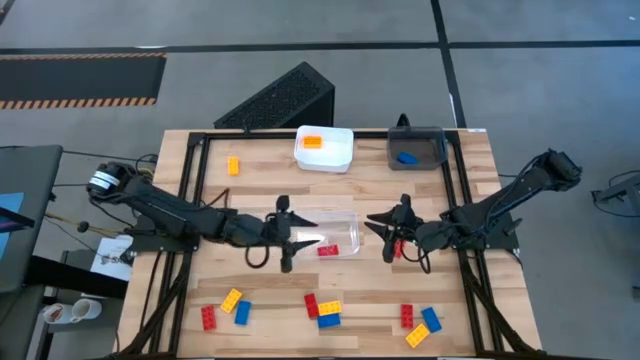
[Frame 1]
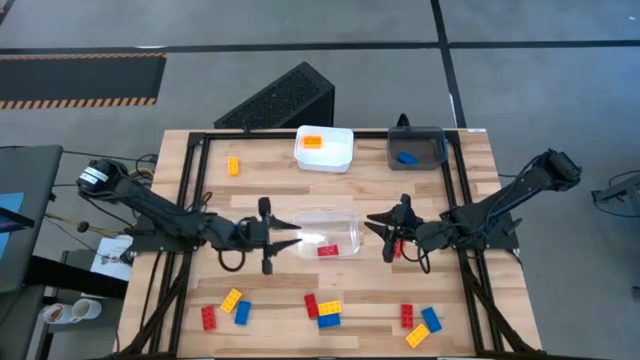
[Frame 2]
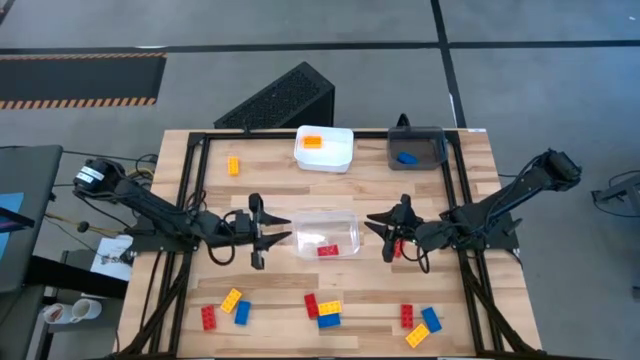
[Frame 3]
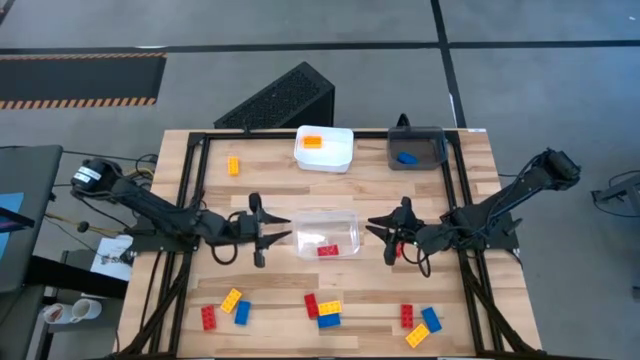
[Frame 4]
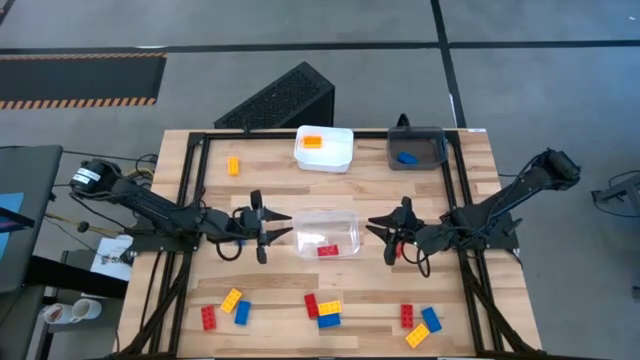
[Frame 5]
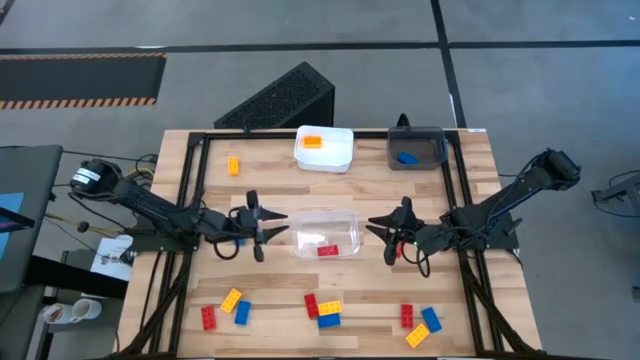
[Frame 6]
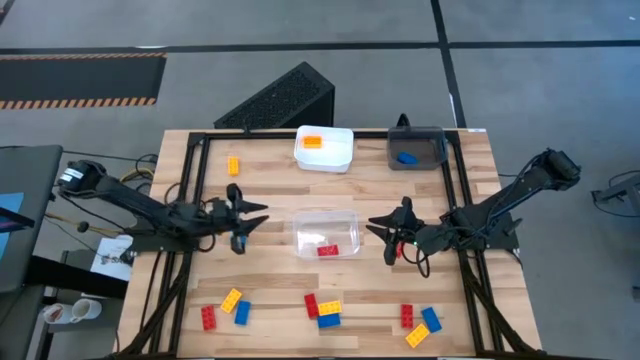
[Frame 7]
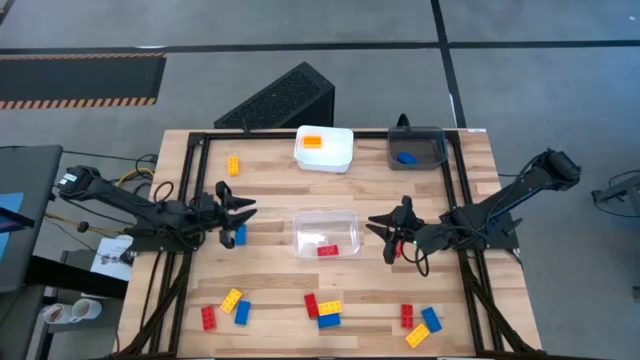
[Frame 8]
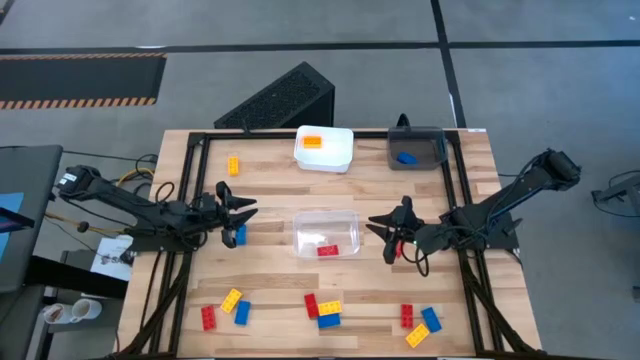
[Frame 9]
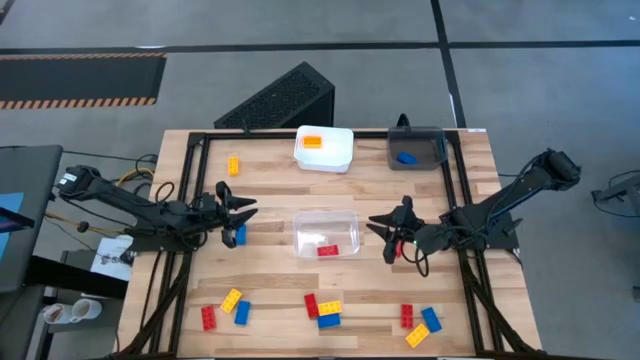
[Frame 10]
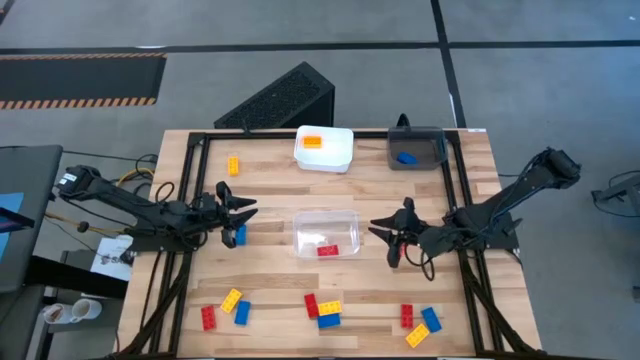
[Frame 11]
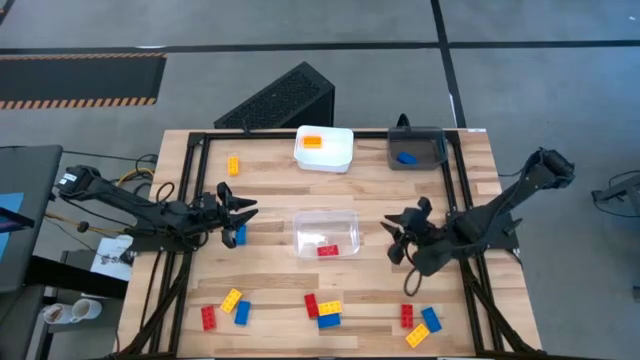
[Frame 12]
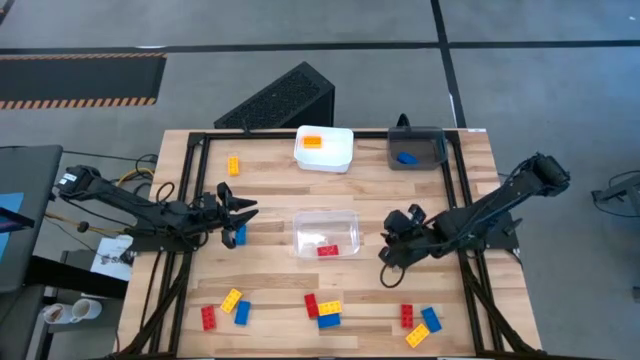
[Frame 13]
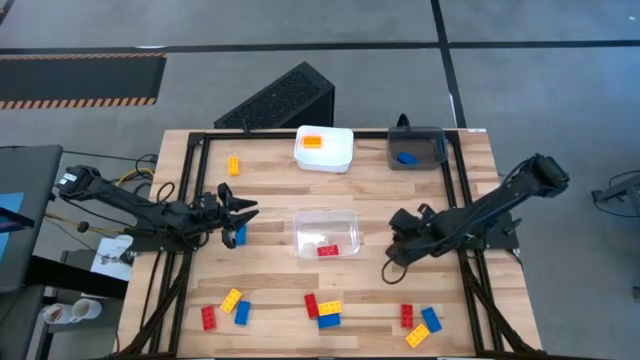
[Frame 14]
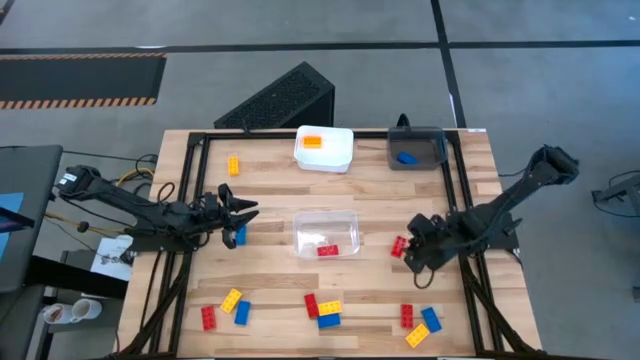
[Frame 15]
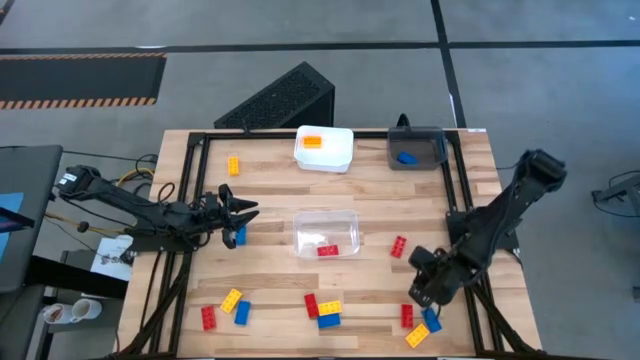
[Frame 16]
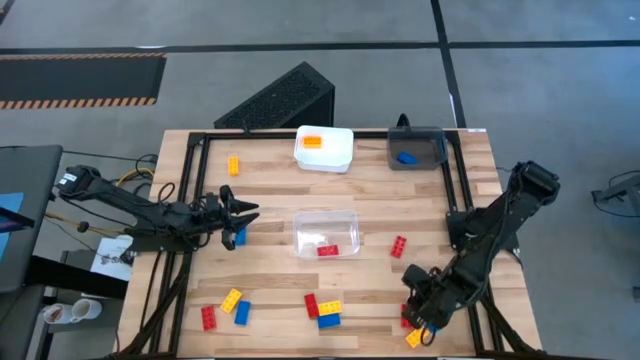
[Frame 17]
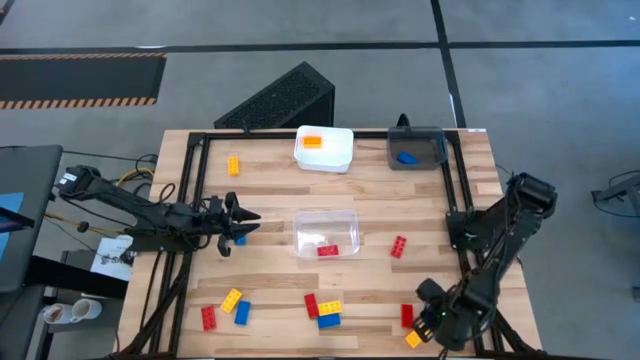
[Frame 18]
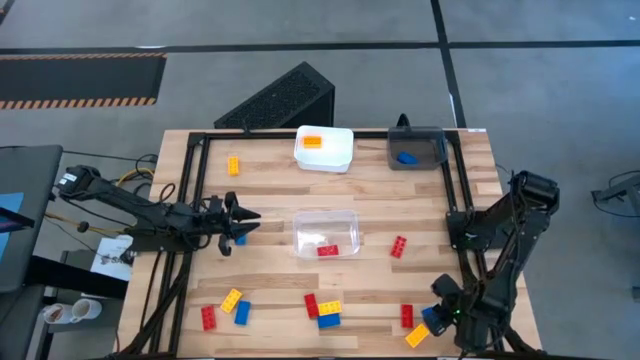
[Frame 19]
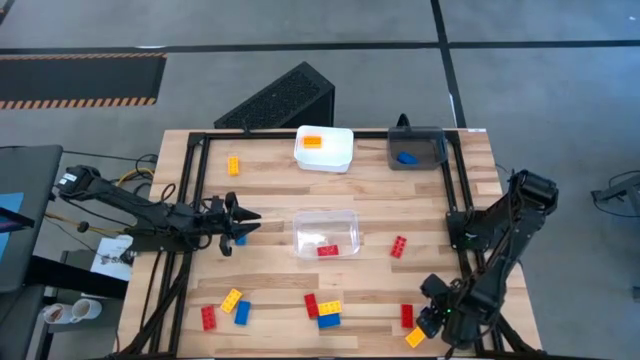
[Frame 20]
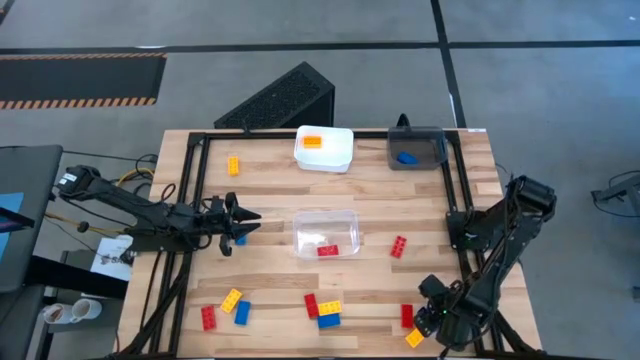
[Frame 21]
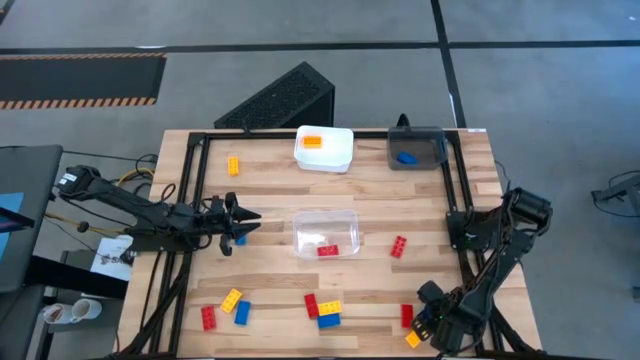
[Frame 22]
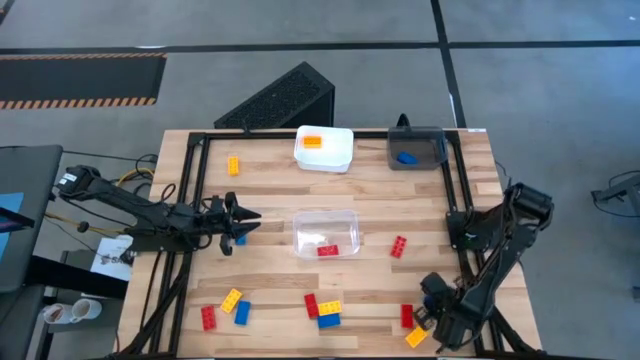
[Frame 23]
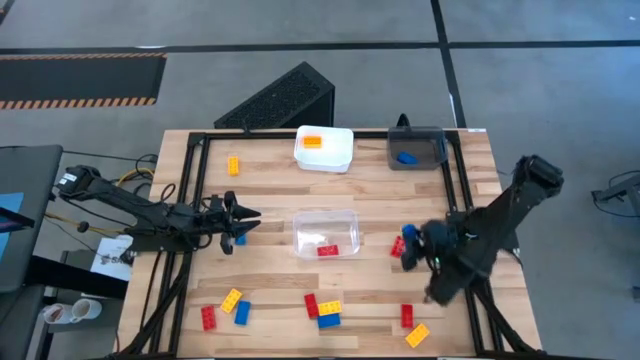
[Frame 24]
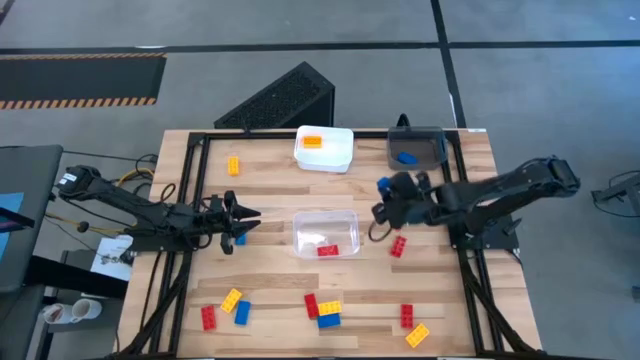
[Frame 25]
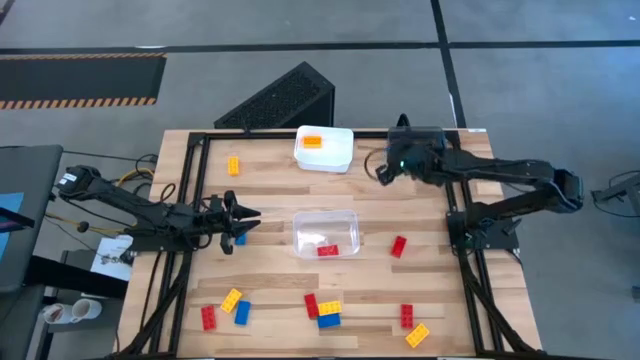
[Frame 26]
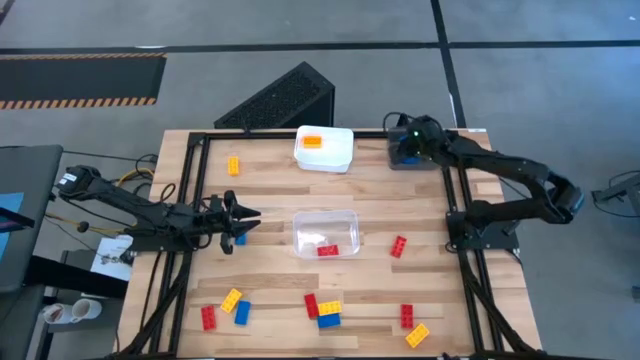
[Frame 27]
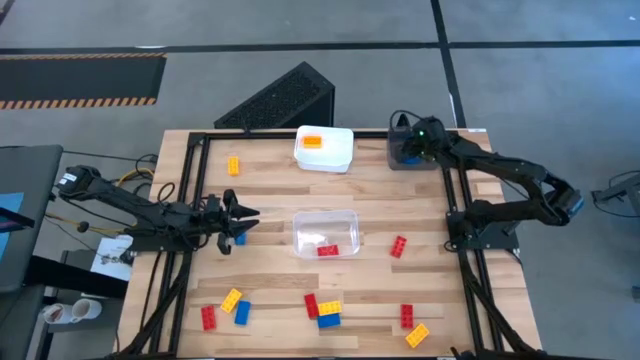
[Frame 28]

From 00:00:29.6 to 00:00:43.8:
Task: Sort & place blocks by color
Put the blue game piece into the black bin

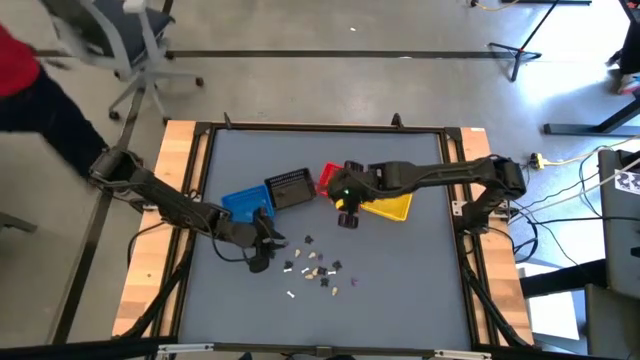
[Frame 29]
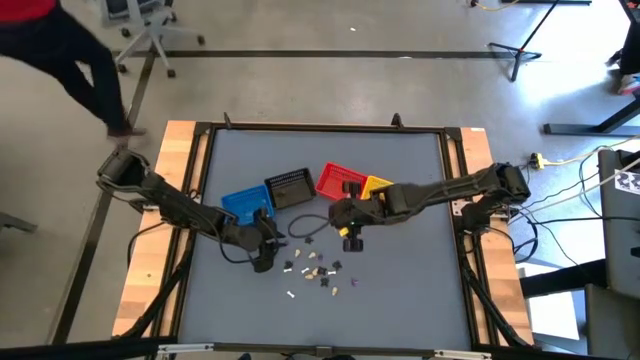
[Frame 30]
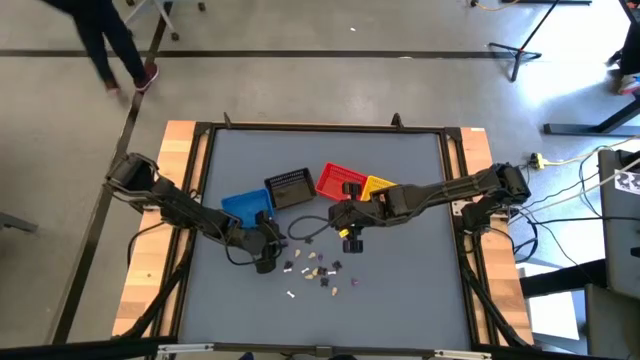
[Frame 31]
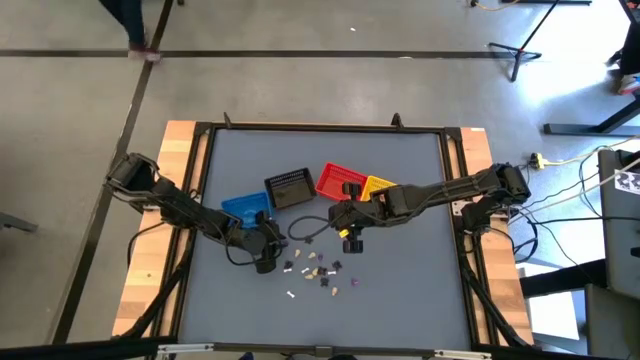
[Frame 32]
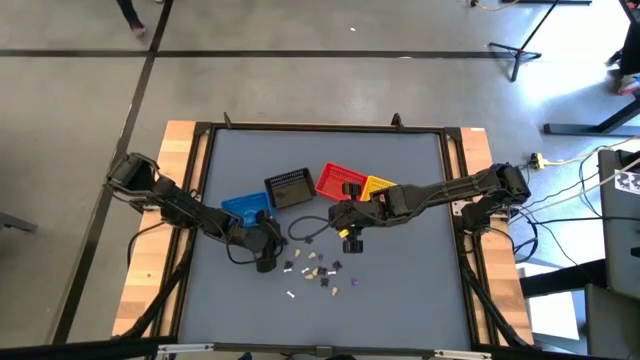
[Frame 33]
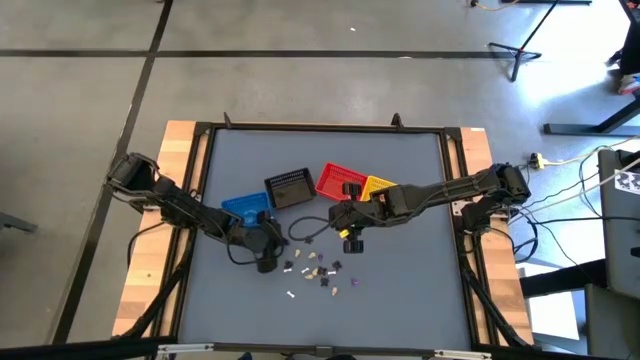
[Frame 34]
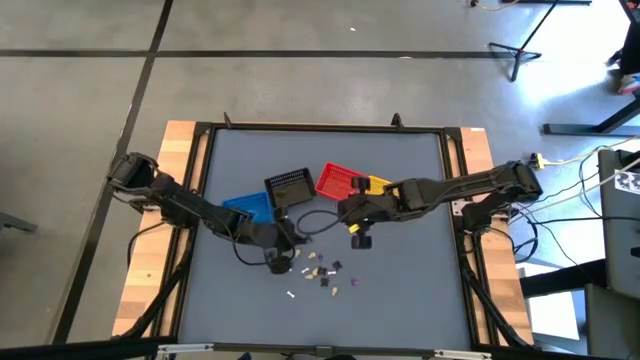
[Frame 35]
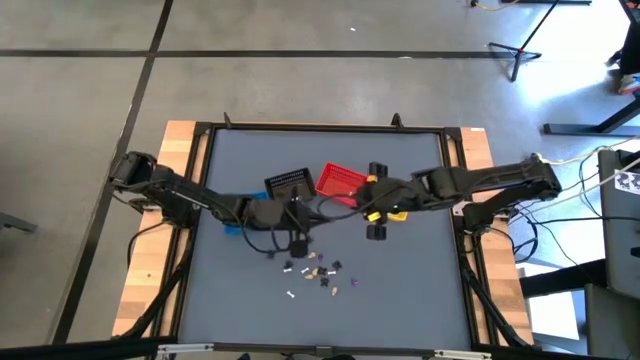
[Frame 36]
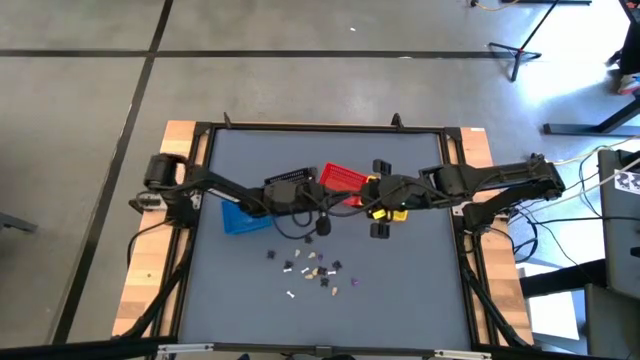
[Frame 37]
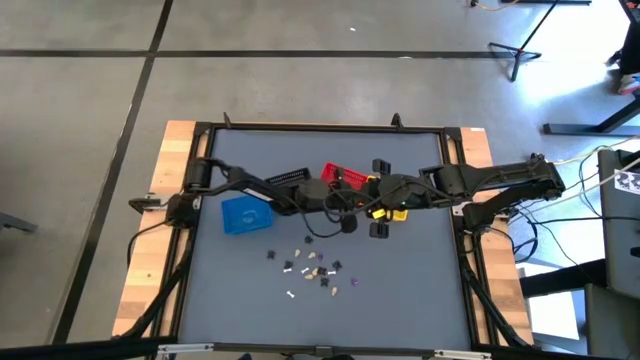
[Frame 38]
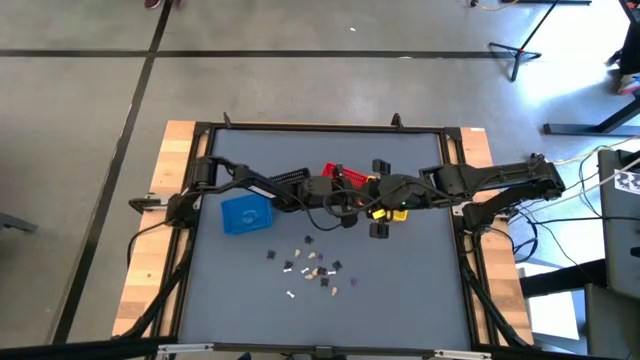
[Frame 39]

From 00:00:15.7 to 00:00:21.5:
Task: Sort Halloween decoration
Put the purple witch hat toy into the yellow bin
